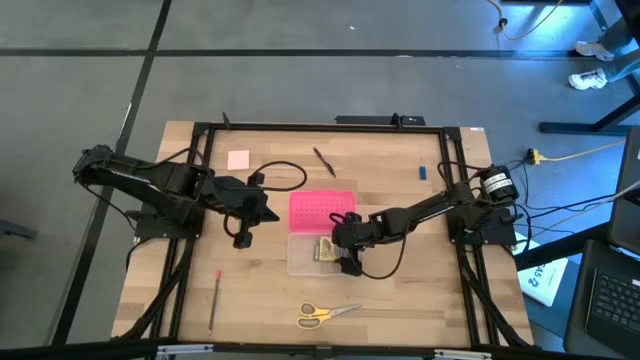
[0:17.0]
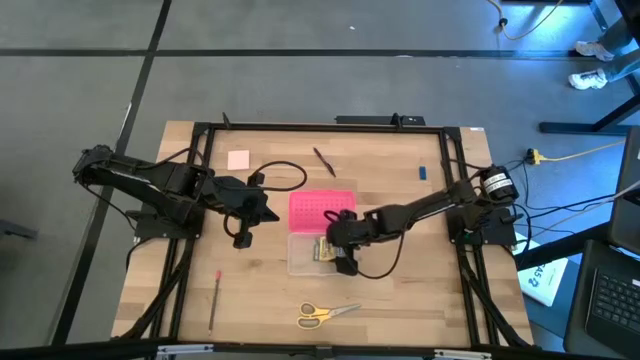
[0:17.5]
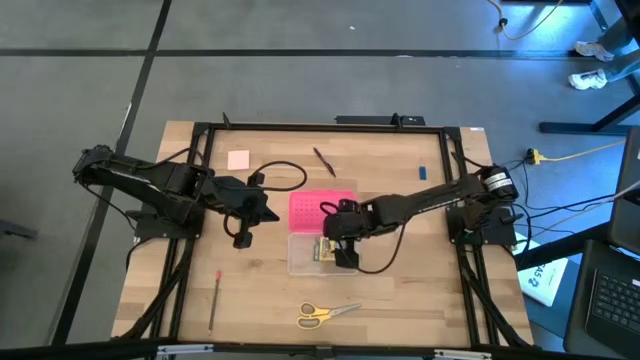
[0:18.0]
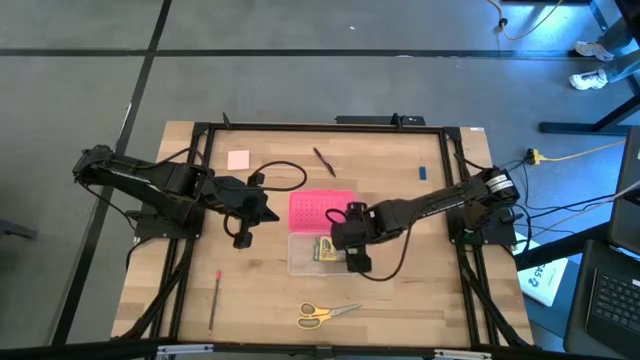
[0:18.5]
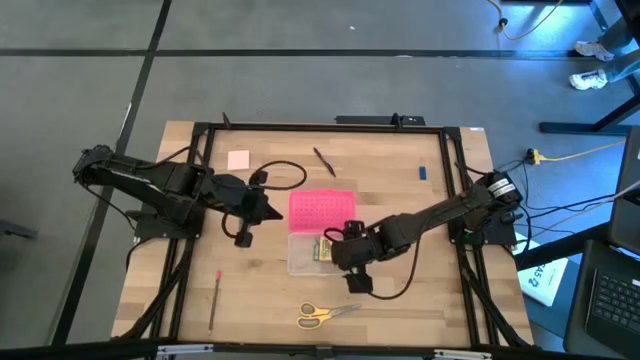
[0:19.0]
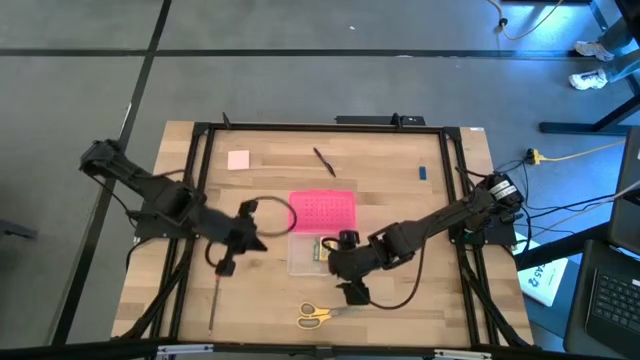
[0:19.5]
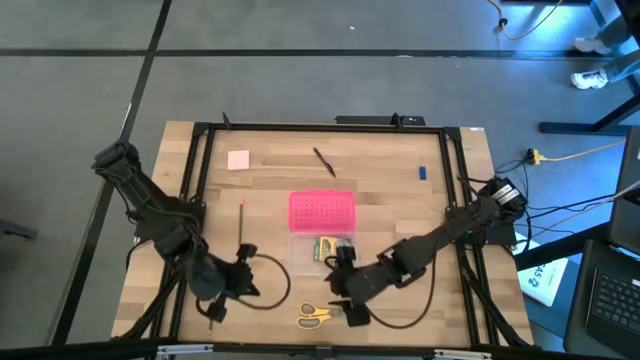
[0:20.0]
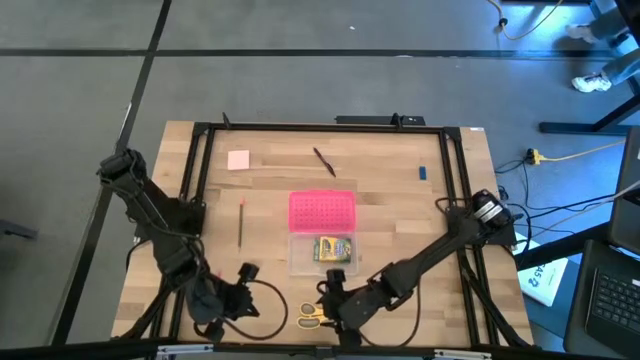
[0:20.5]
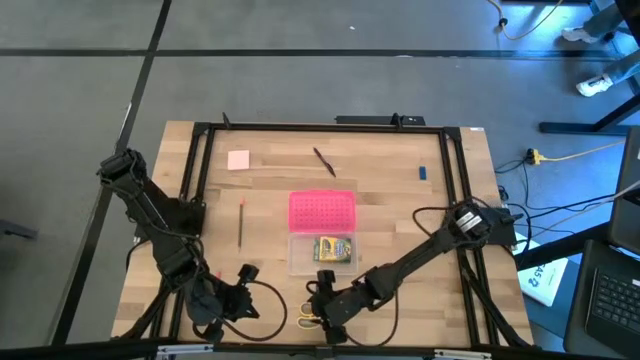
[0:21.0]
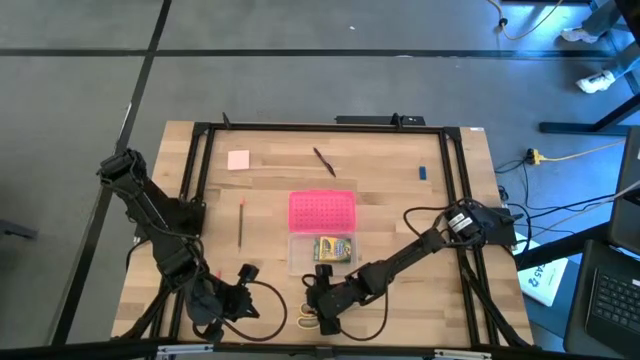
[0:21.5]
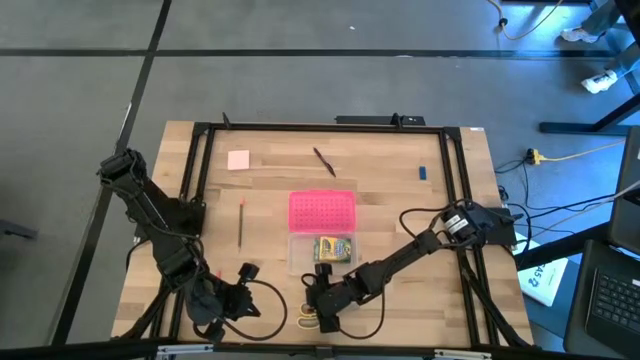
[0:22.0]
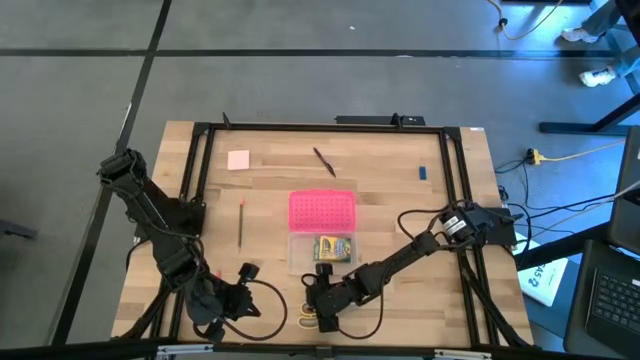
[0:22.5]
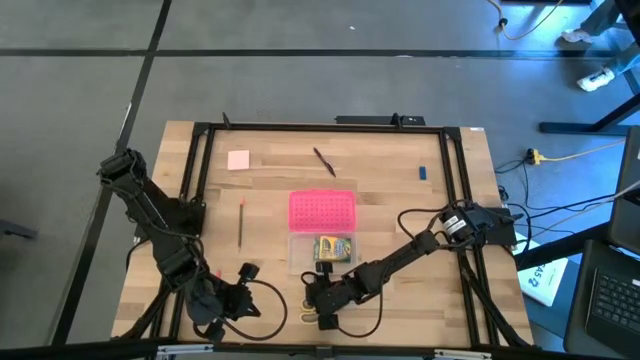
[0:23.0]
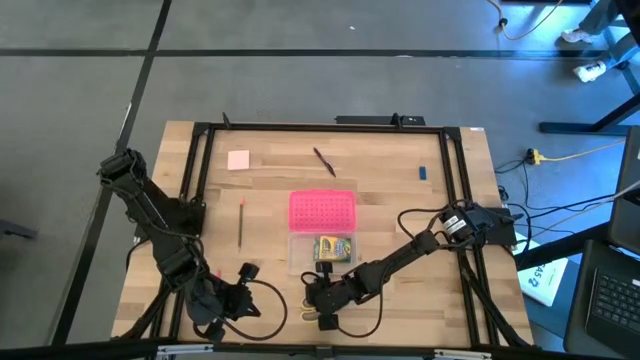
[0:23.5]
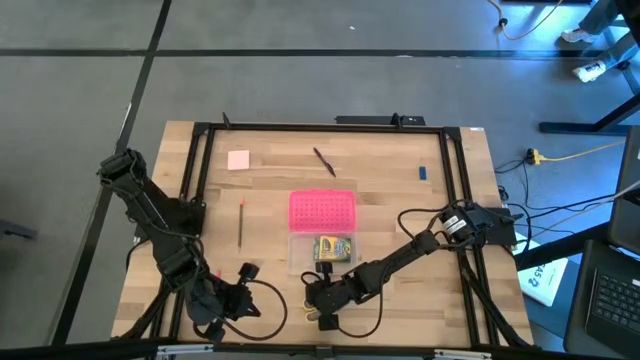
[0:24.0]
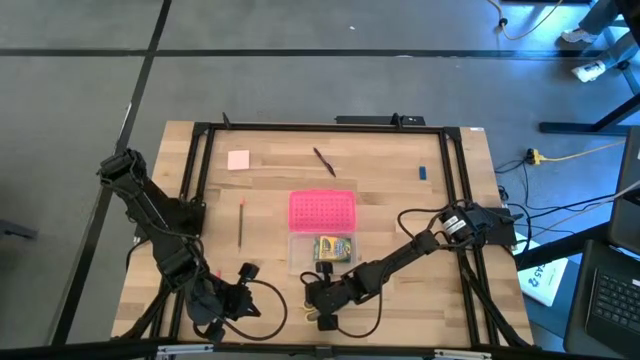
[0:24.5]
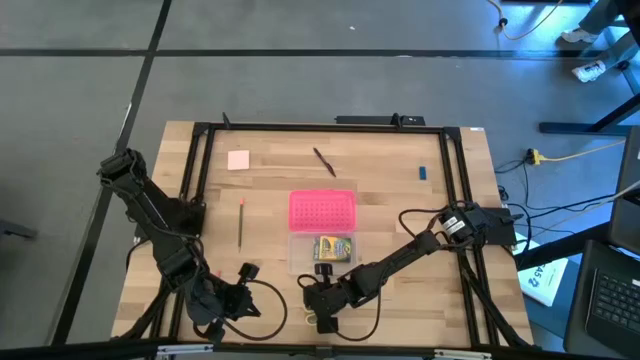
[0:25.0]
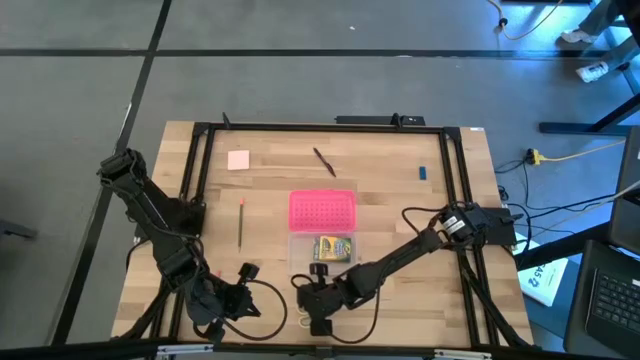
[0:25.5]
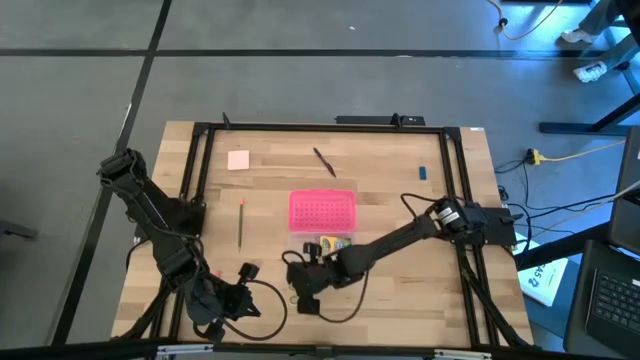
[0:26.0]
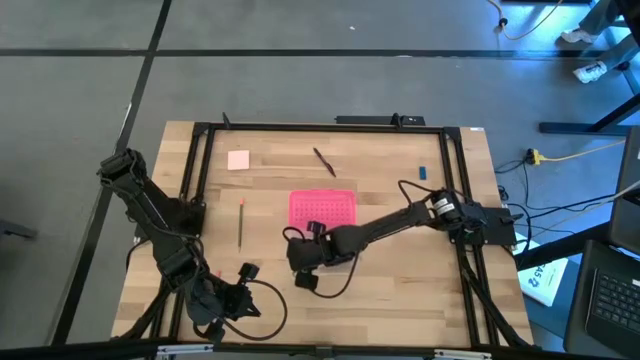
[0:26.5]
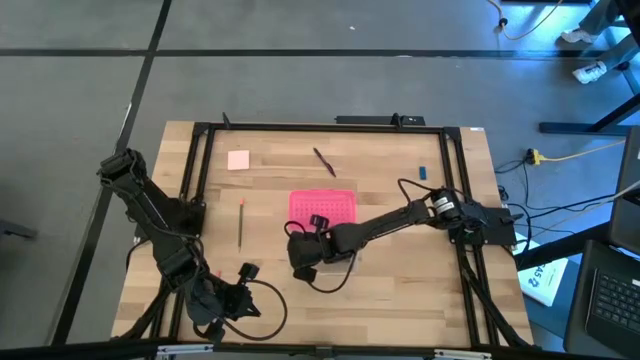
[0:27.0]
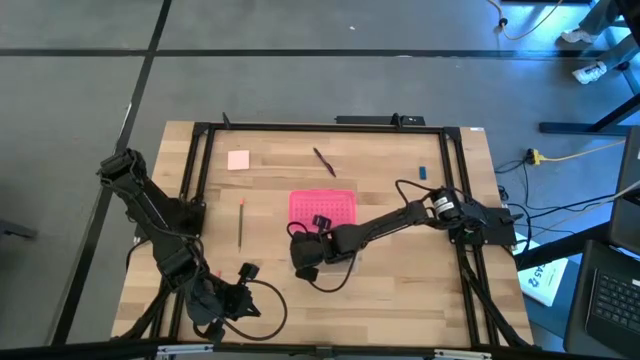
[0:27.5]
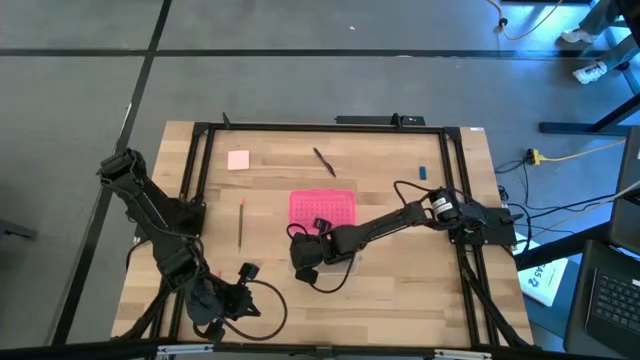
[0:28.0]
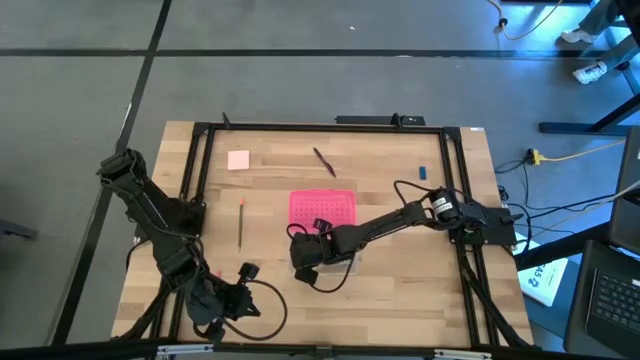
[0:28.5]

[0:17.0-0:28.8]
Task: Pack school essentials
Put the yellow scissors into the pink supply box

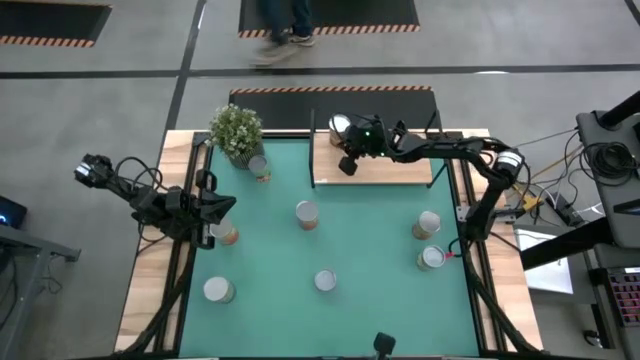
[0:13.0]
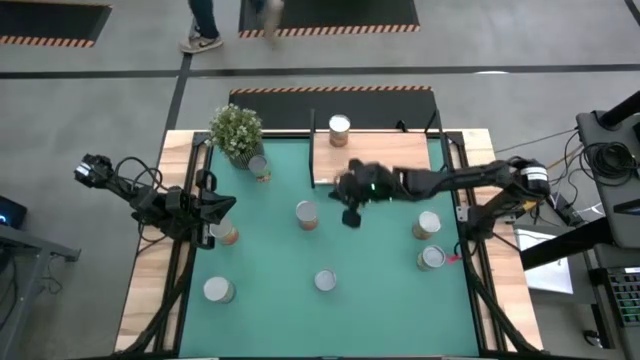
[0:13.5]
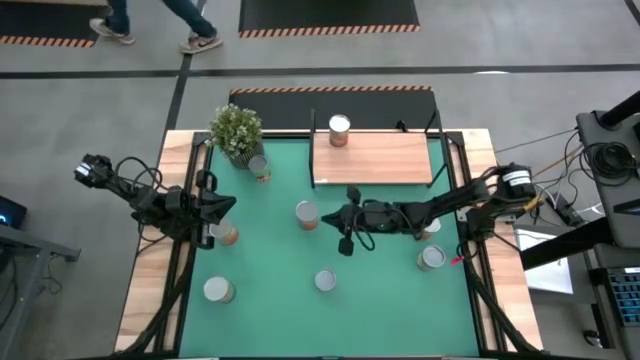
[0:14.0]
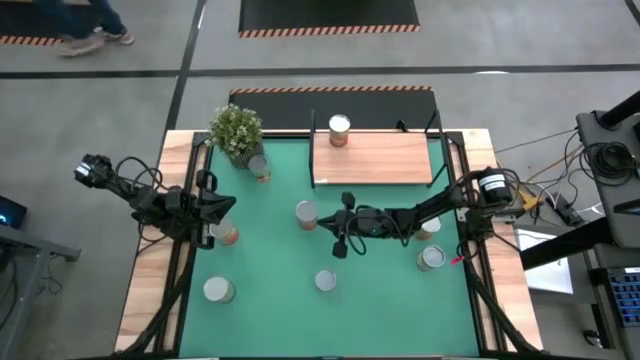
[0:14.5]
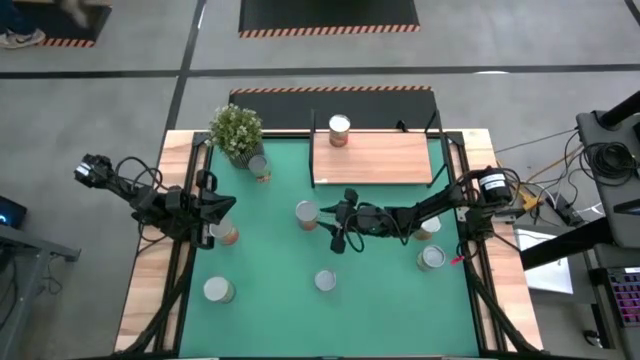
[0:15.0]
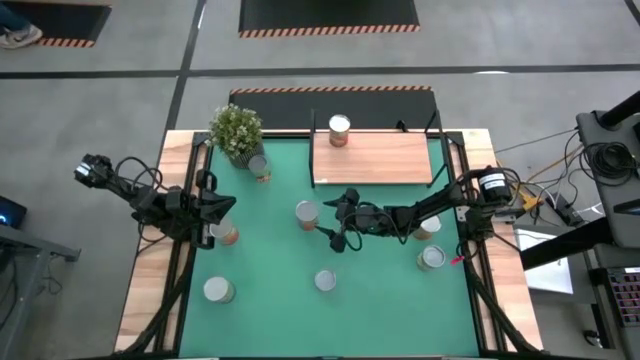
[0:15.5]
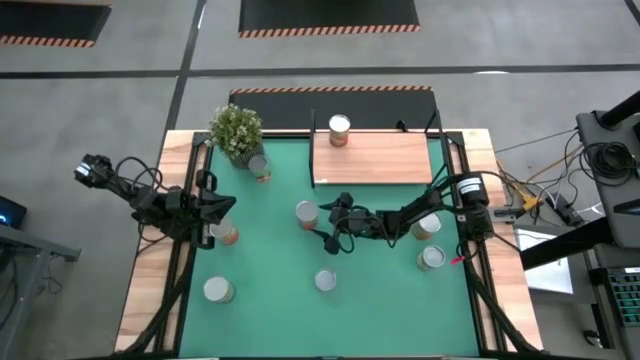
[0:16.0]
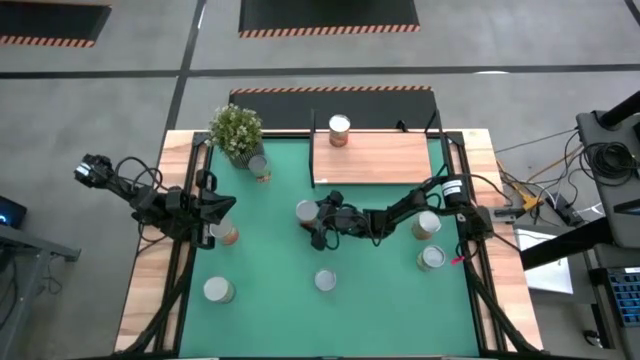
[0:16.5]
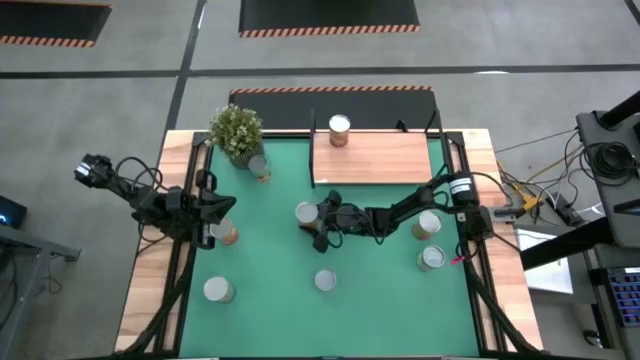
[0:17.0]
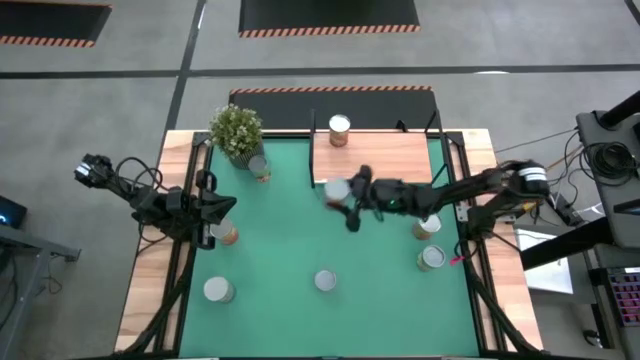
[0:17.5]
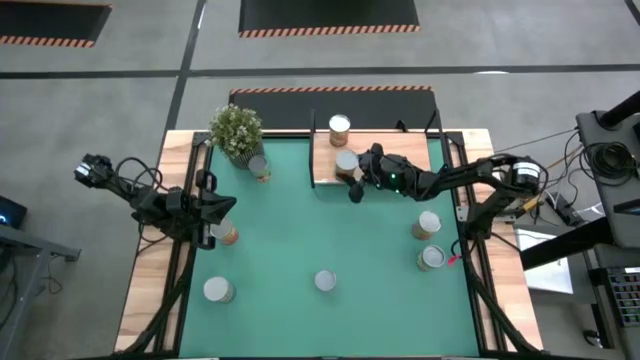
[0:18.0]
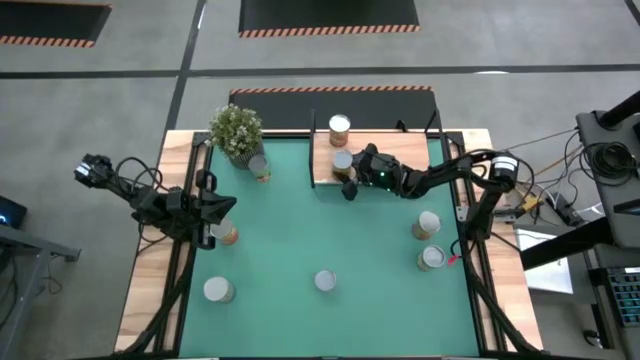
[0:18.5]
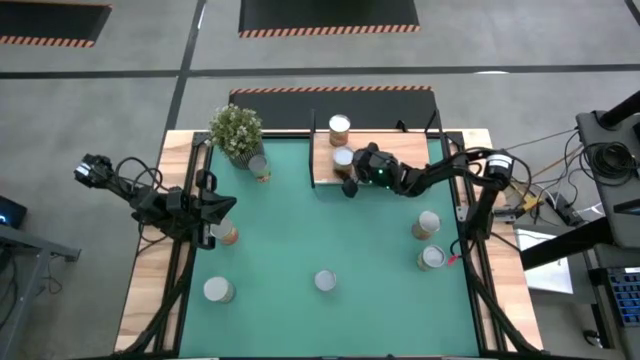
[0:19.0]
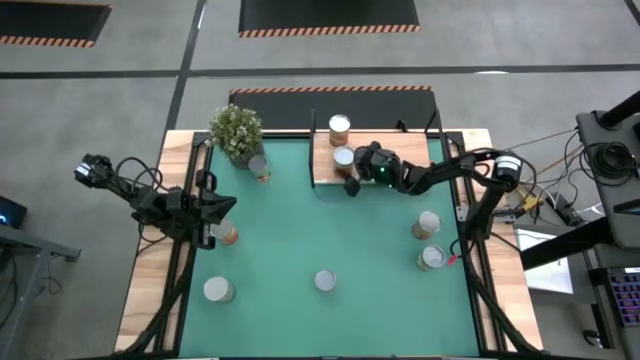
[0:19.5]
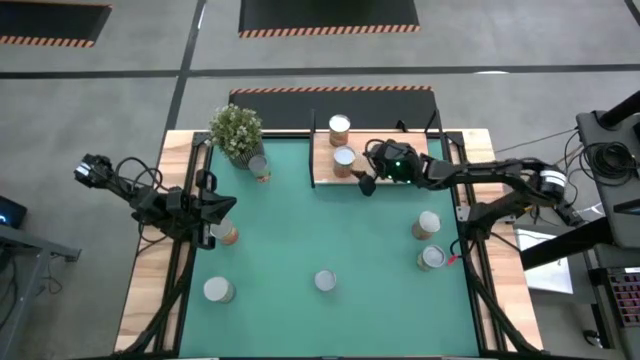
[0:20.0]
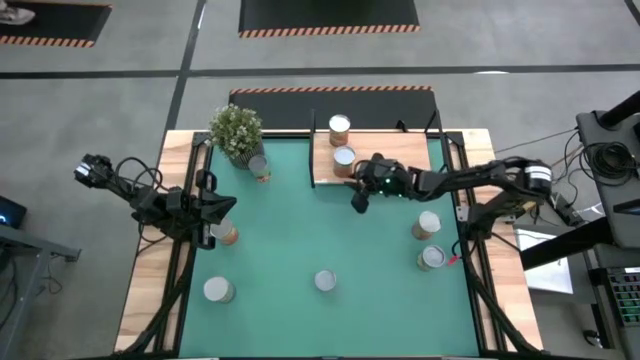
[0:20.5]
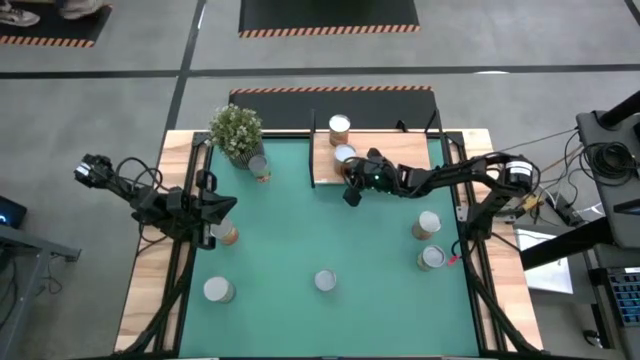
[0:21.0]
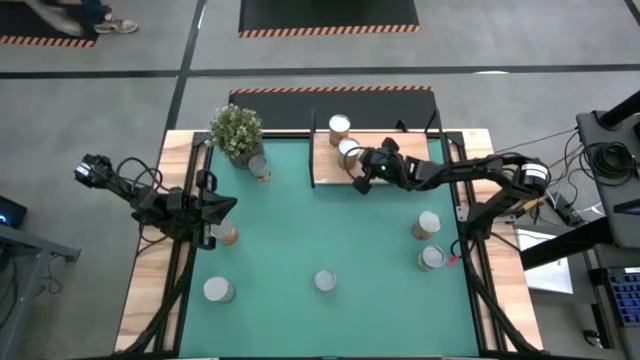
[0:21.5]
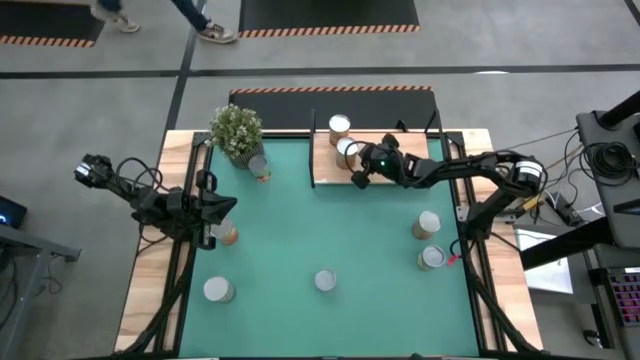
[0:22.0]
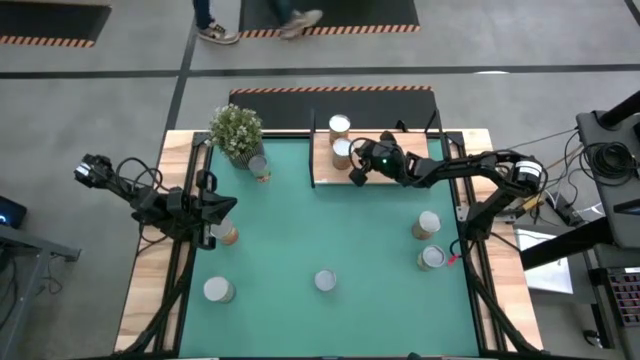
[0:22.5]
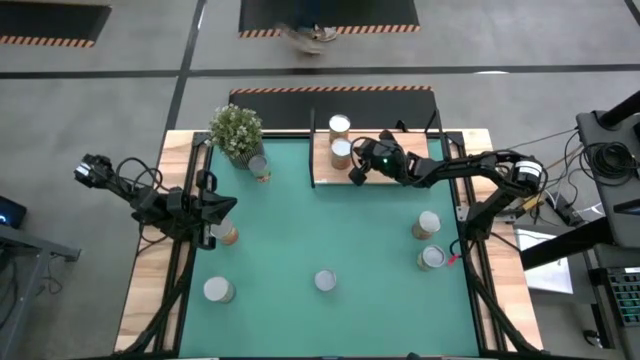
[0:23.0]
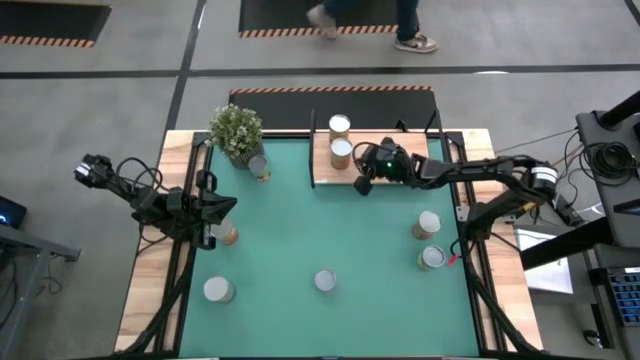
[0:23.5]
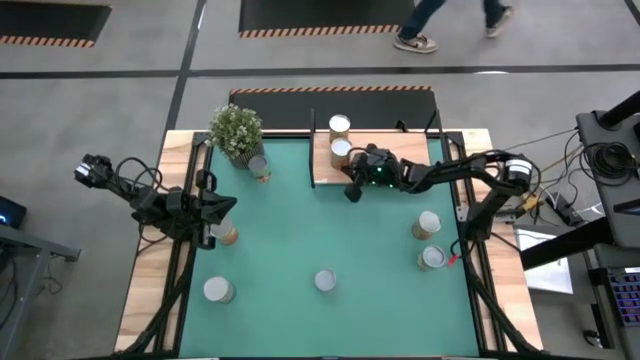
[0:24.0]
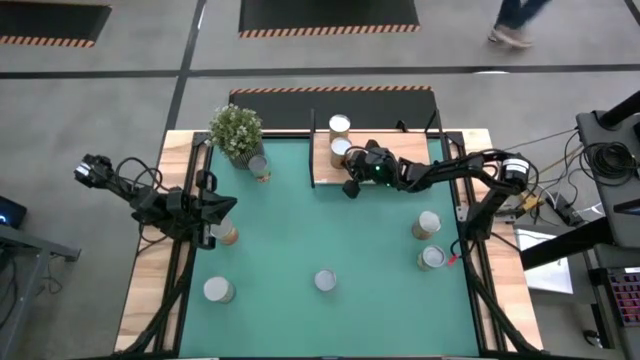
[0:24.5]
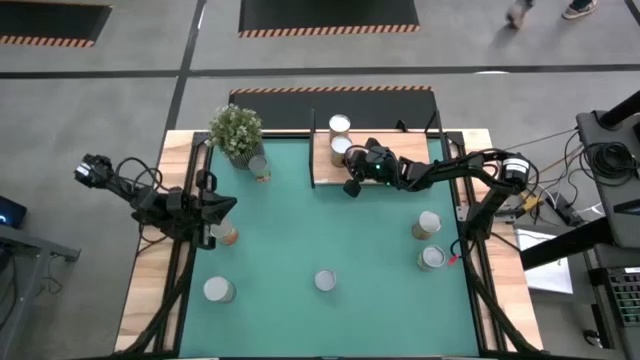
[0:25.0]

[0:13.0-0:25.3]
Task: Pick and place cans onto a shelf
Put the orange can on the shelf
